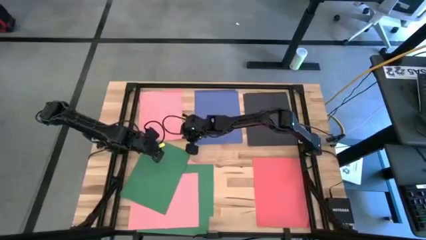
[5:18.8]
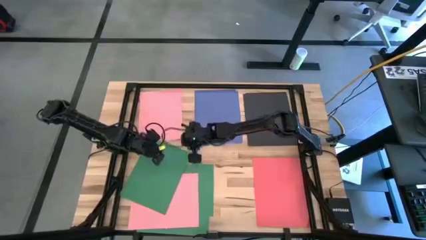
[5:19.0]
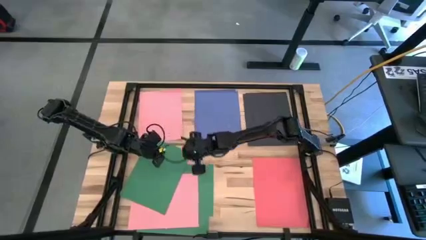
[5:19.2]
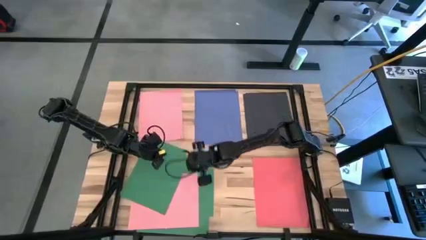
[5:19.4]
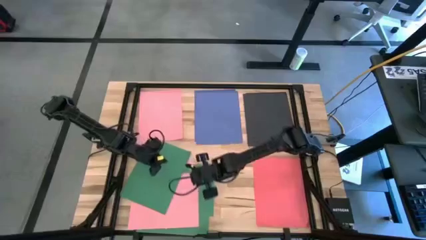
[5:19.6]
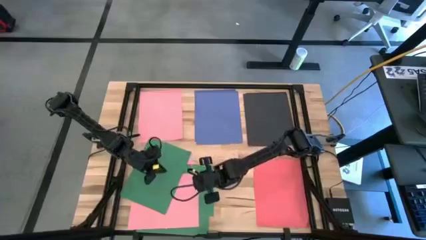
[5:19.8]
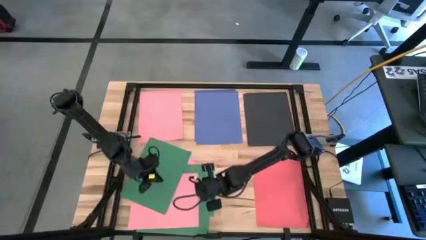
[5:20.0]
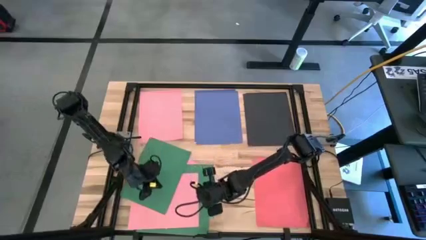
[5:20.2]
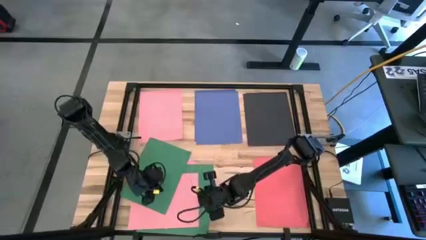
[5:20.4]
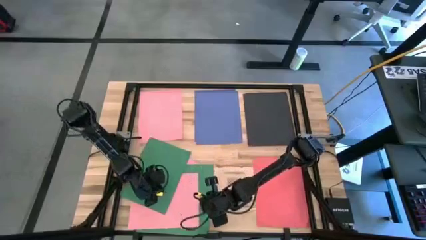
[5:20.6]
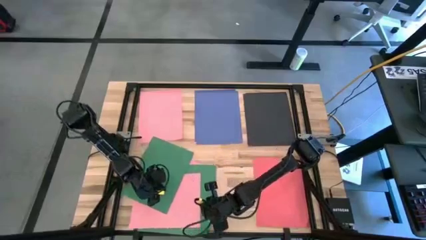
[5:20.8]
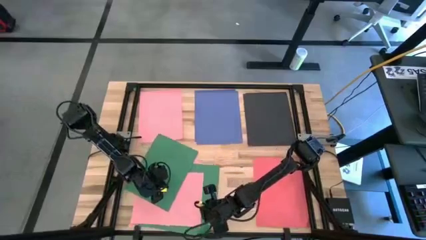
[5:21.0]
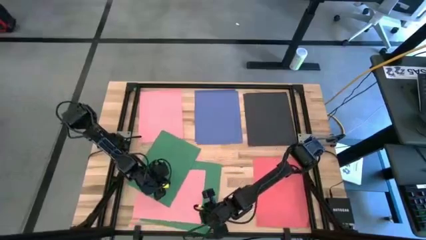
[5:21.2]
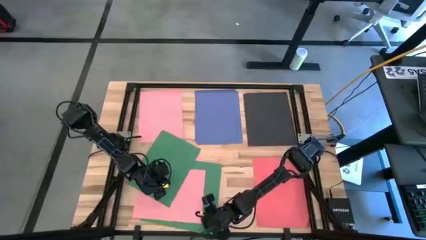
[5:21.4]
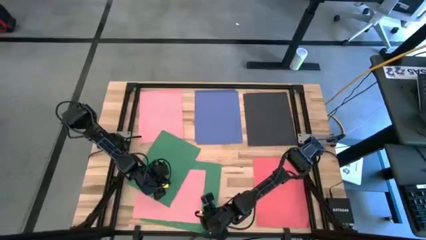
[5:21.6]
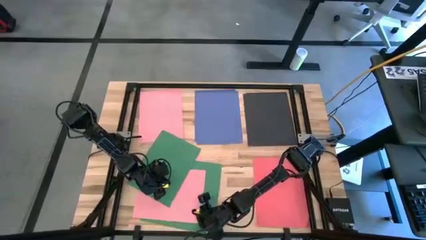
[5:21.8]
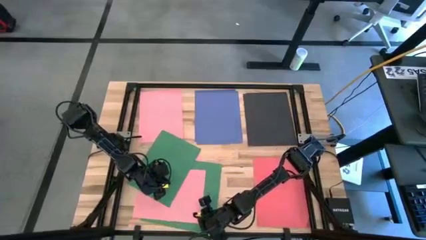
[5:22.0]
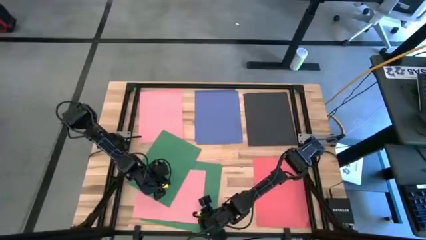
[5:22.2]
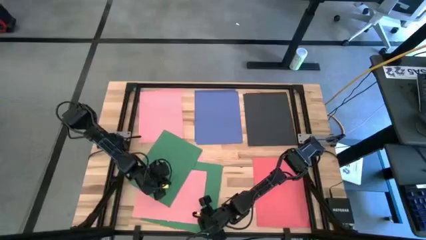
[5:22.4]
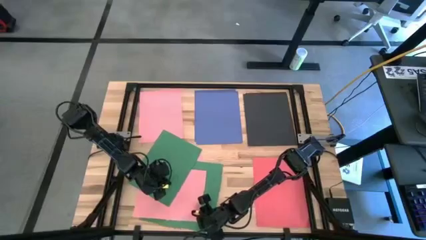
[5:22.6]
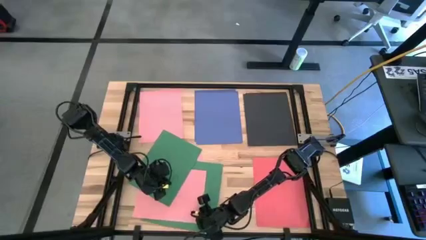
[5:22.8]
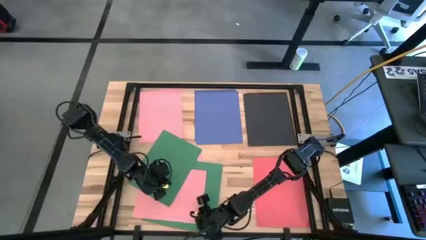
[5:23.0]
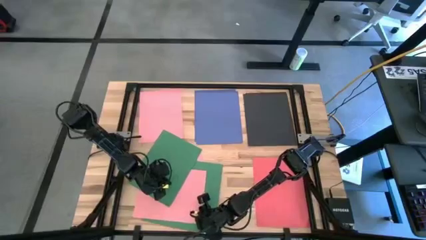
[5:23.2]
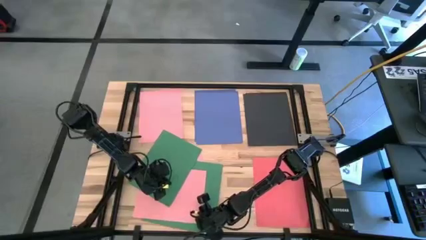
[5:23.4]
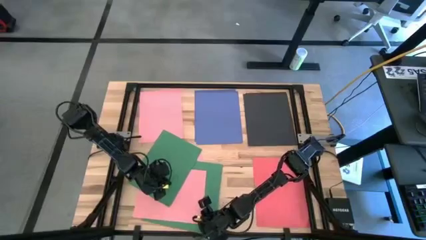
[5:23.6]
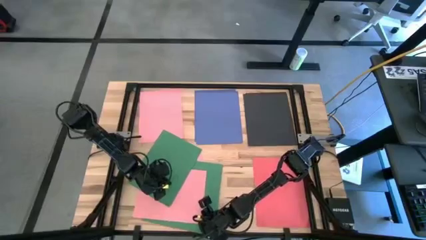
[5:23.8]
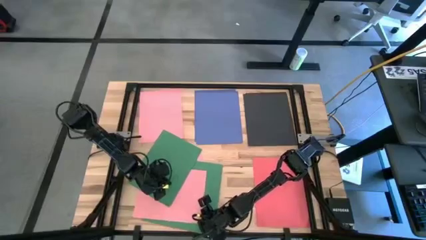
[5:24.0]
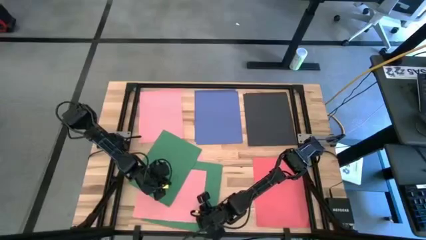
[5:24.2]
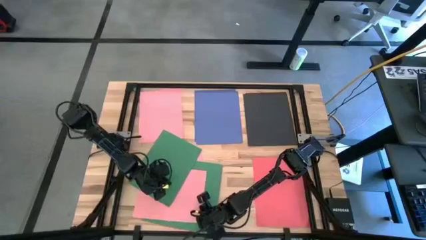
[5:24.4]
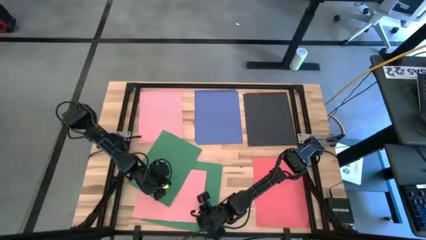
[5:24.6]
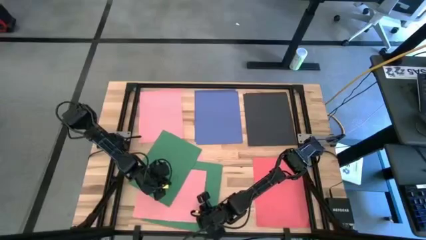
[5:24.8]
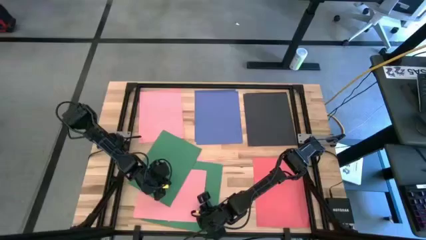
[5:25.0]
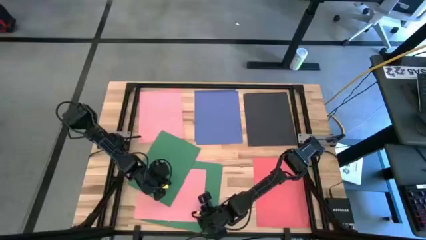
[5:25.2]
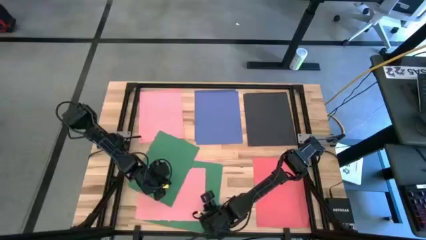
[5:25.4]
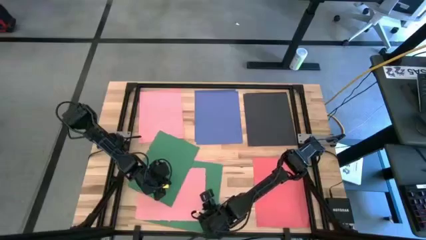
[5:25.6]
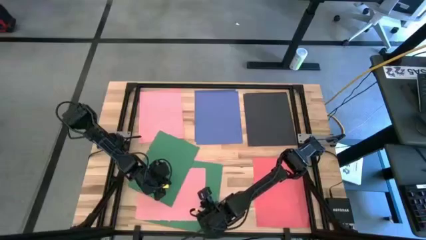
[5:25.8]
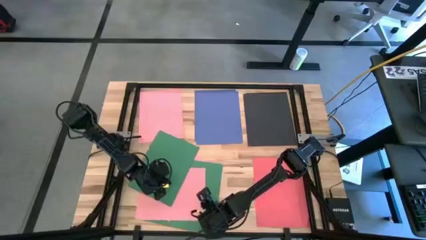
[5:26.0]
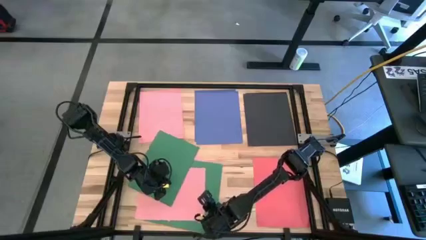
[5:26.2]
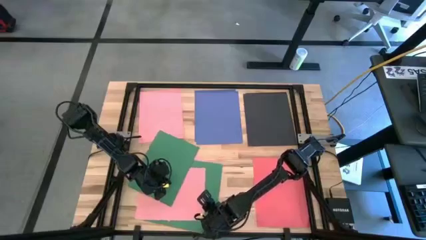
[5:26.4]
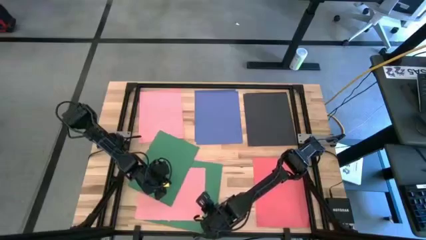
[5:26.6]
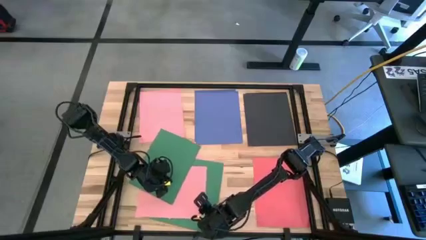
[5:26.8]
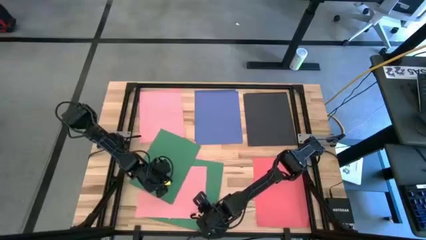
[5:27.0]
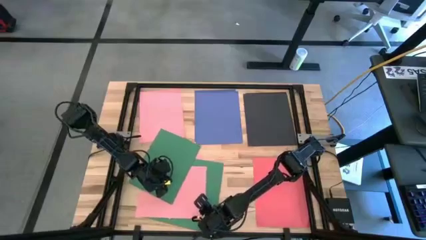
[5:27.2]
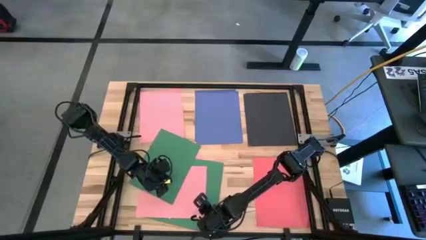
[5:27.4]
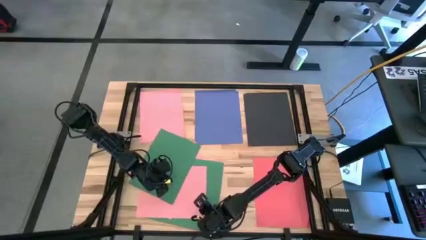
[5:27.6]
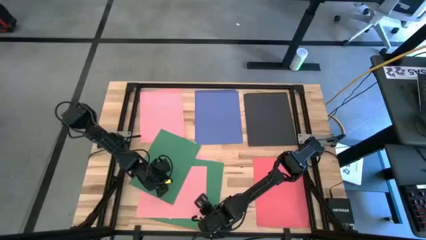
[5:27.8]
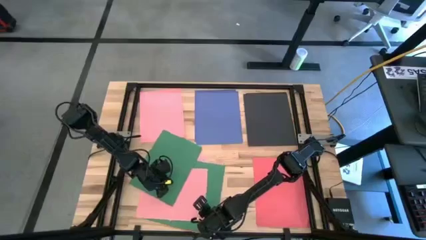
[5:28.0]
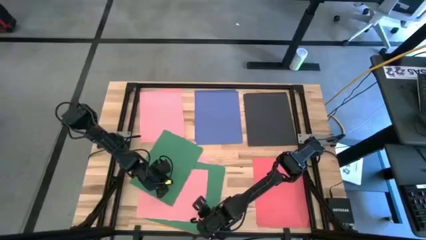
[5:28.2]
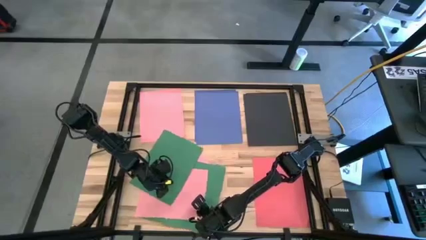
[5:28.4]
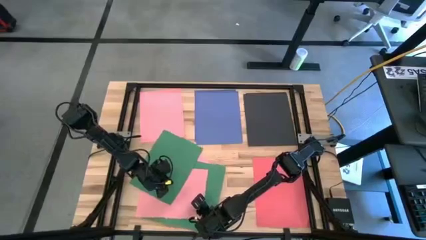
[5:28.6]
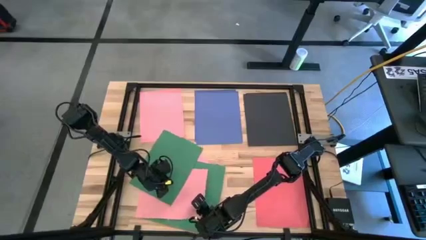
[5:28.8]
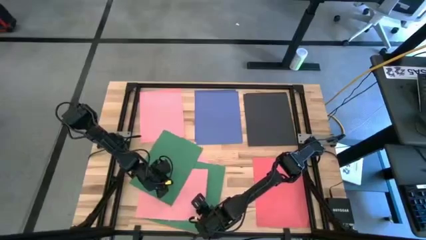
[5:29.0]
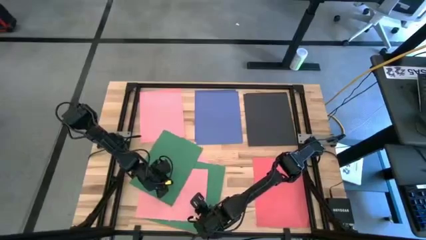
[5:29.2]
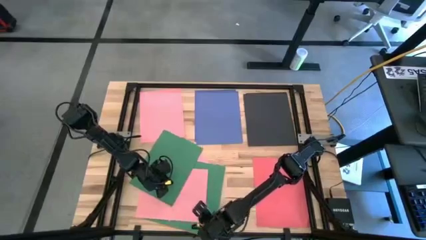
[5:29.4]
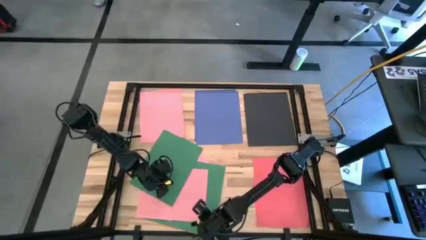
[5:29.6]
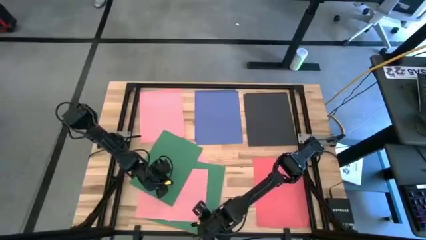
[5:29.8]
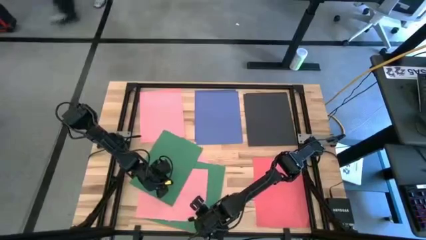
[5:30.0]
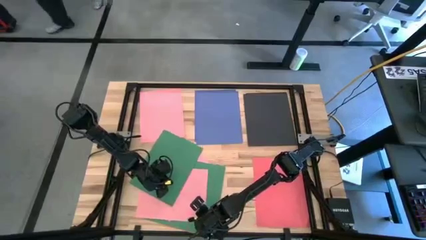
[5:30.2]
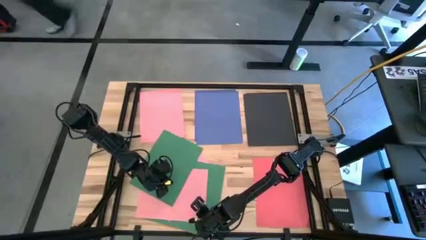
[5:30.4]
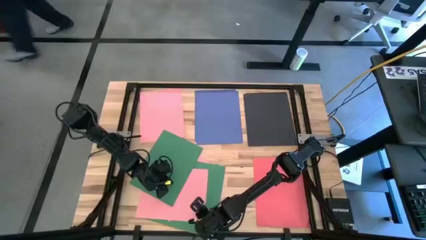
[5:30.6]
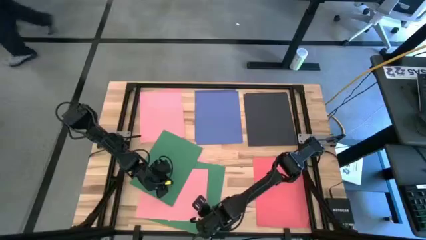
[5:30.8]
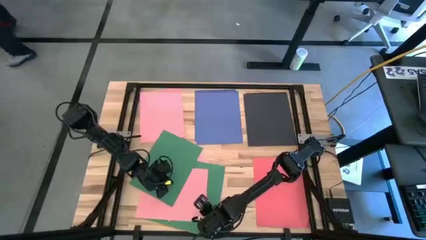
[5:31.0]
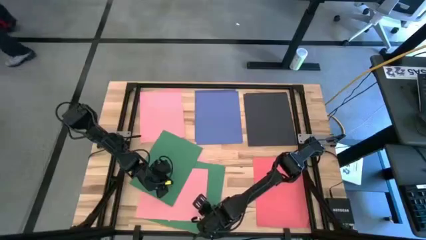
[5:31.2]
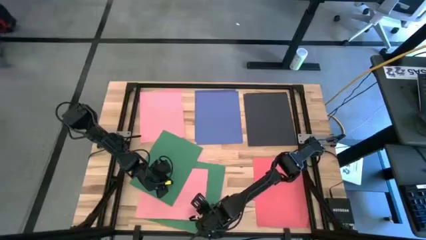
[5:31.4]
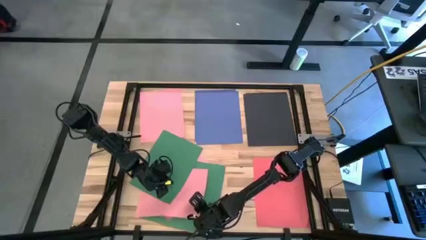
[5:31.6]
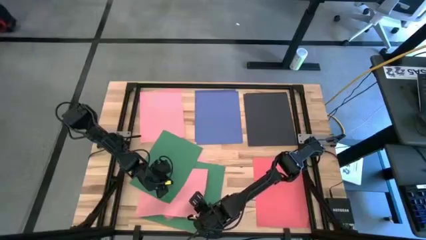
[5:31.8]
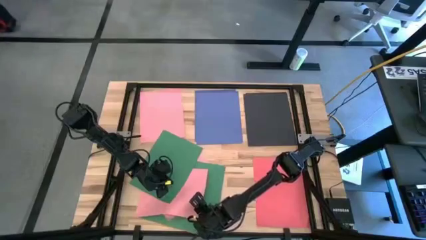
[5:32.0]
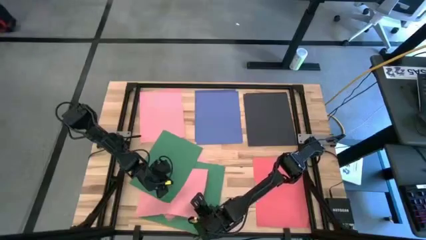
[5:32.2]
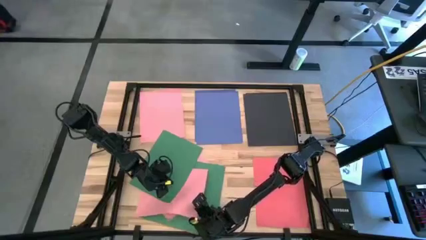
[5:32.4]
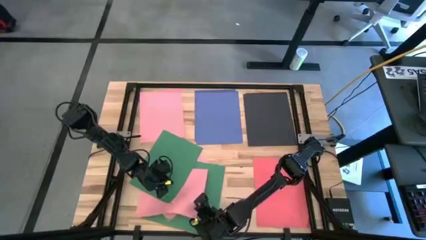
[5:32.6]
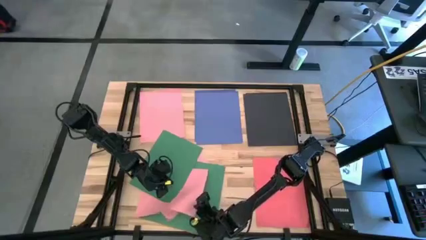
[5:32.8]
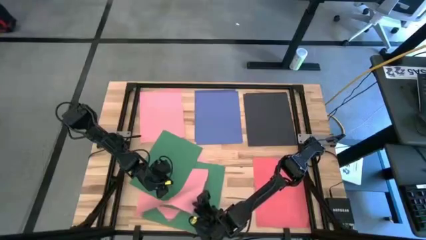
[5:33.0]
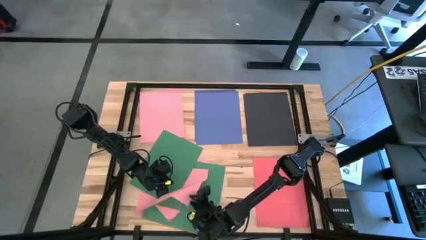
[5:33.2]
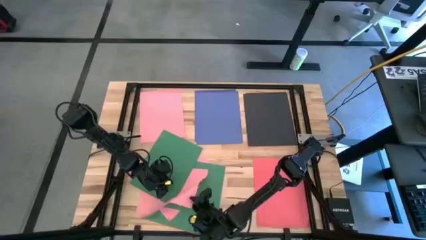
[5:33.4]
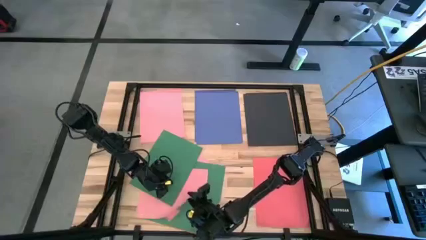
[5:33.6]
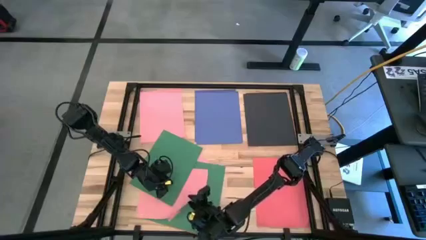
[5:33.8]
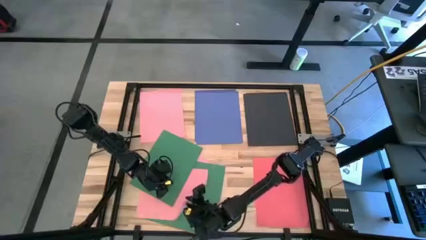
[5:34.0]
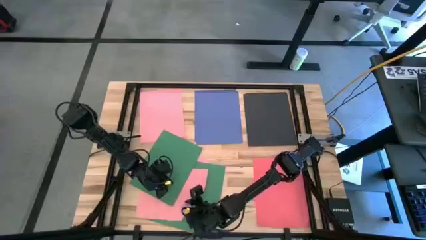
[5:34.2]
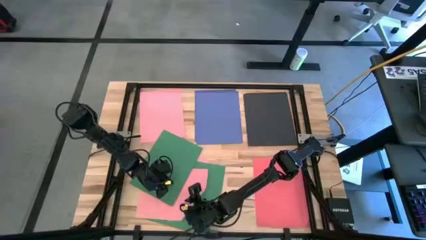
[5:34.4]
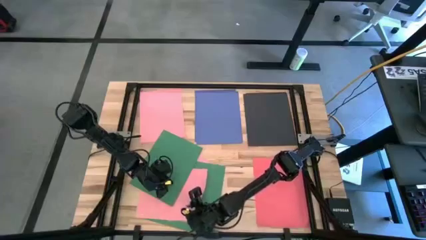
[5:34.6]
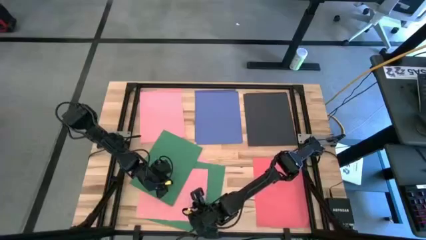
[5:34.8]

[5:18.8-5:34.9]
Task: Organize paper
Stack the pink paper on top of the other pink paper on the table
